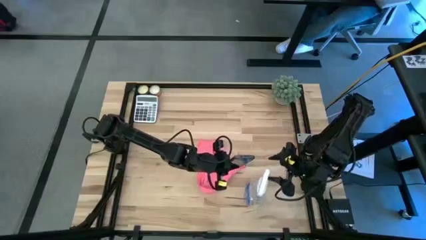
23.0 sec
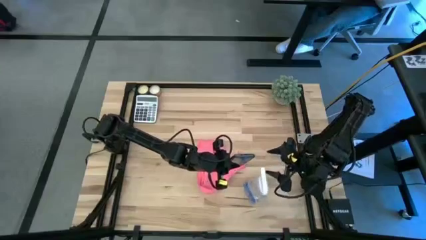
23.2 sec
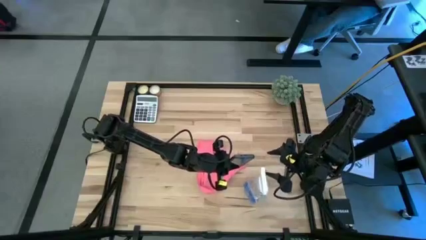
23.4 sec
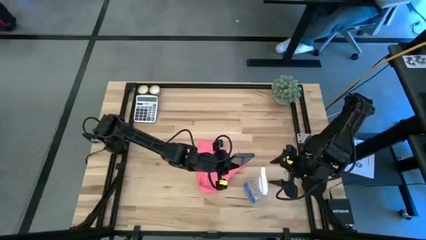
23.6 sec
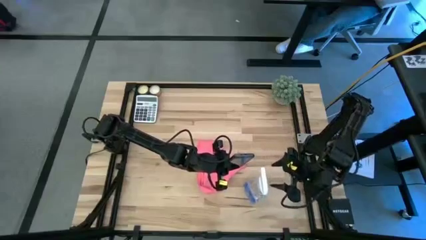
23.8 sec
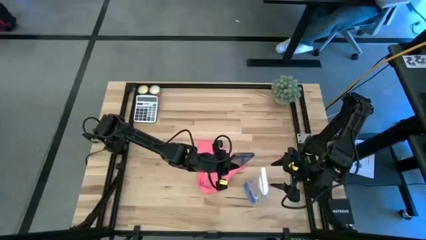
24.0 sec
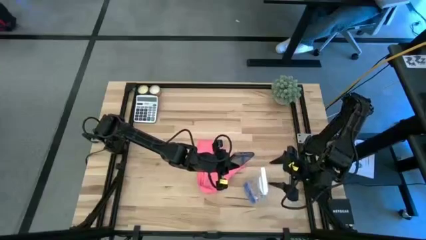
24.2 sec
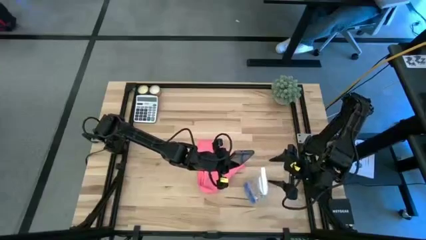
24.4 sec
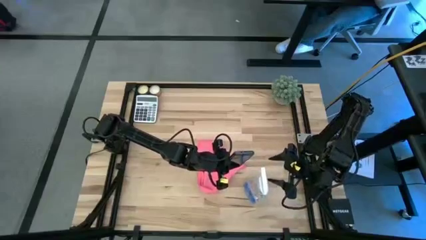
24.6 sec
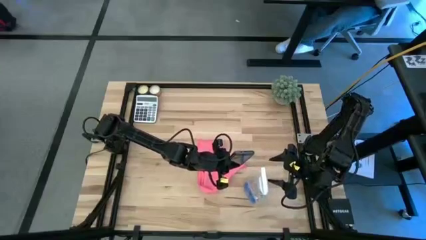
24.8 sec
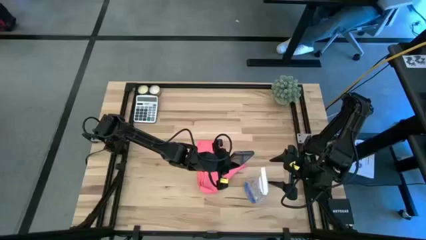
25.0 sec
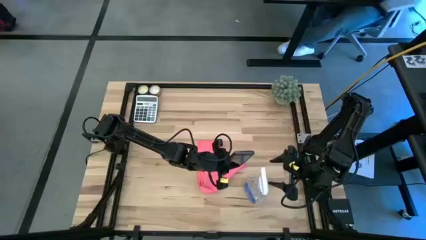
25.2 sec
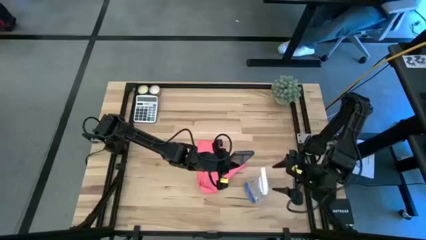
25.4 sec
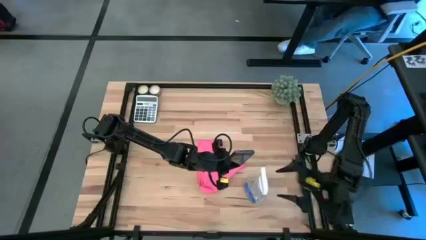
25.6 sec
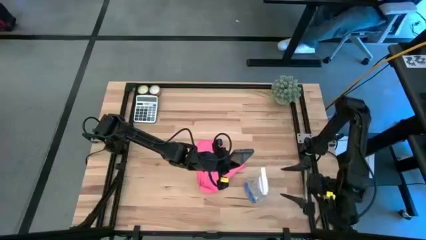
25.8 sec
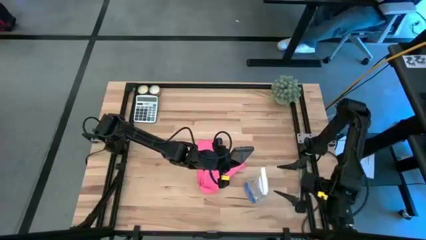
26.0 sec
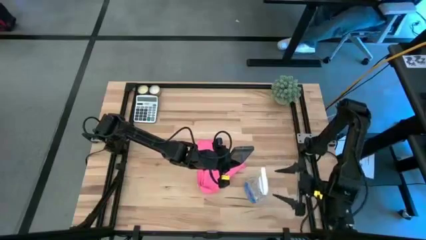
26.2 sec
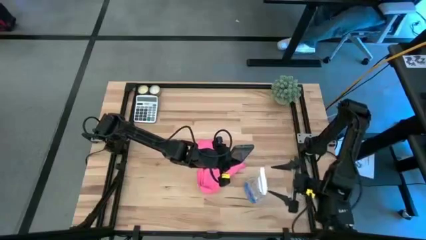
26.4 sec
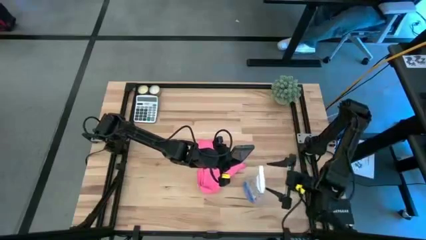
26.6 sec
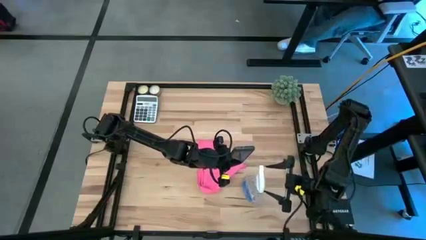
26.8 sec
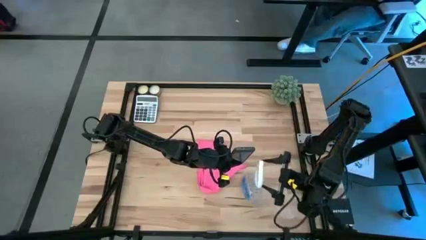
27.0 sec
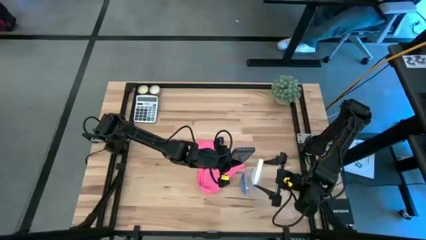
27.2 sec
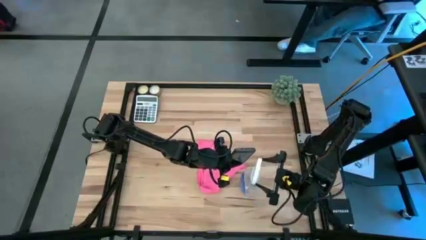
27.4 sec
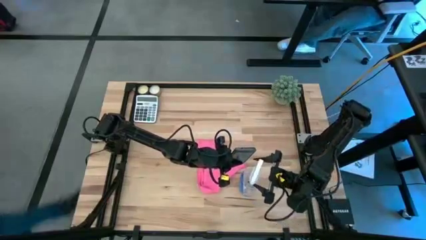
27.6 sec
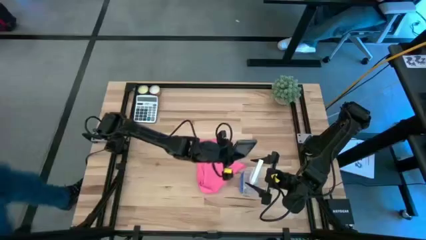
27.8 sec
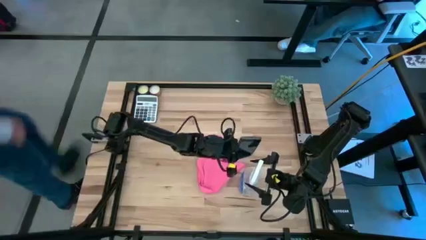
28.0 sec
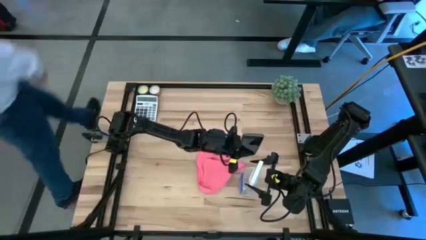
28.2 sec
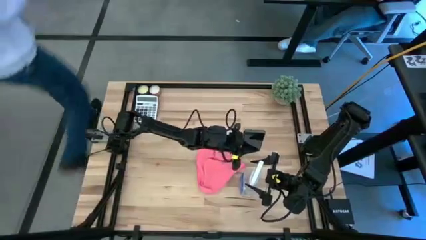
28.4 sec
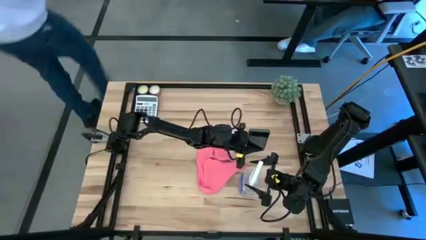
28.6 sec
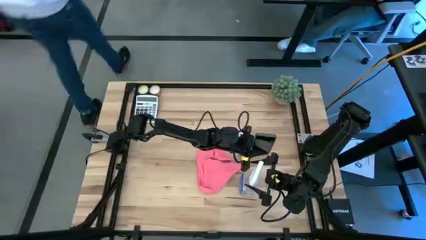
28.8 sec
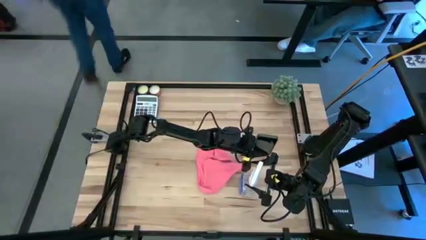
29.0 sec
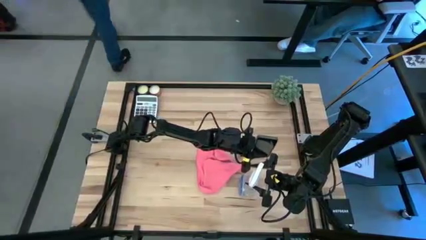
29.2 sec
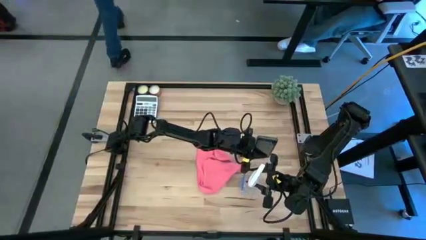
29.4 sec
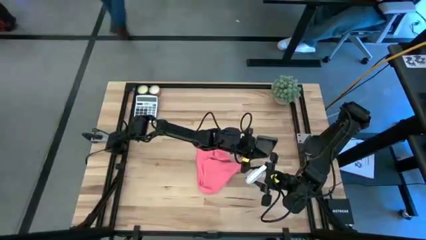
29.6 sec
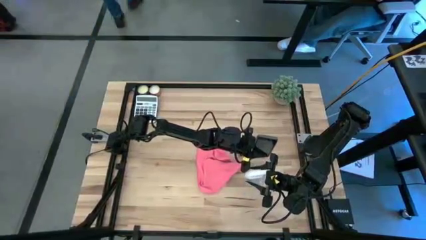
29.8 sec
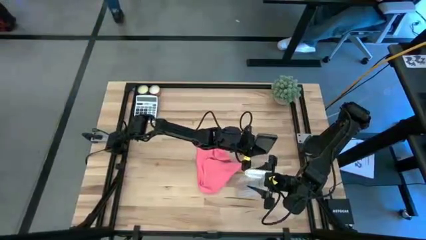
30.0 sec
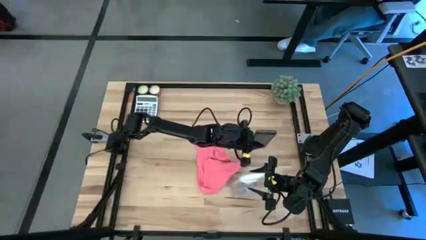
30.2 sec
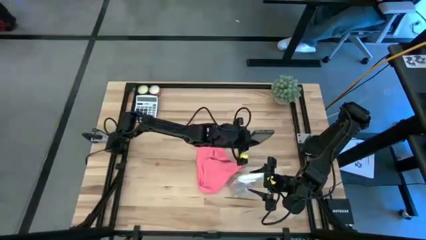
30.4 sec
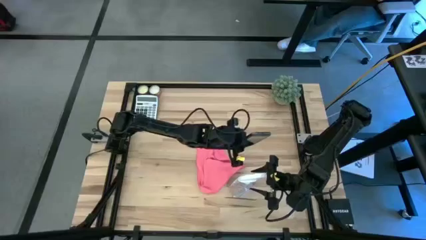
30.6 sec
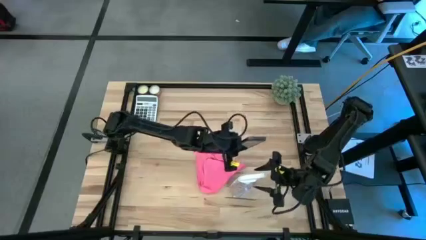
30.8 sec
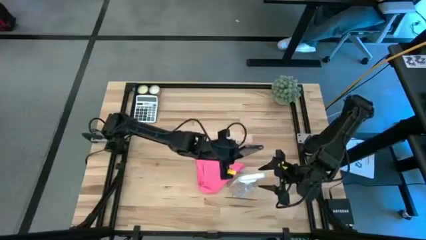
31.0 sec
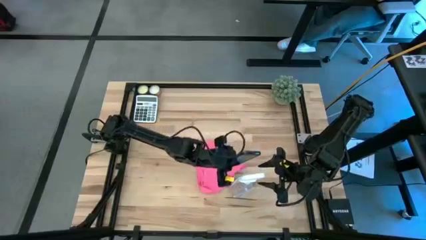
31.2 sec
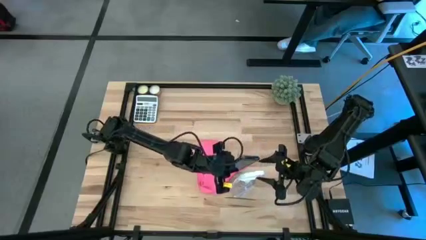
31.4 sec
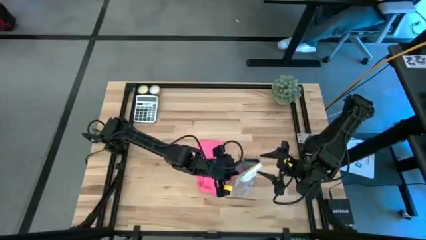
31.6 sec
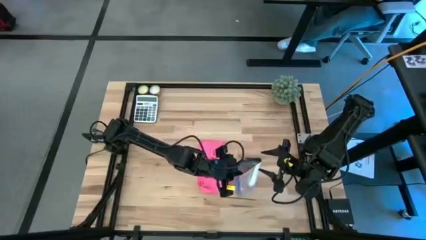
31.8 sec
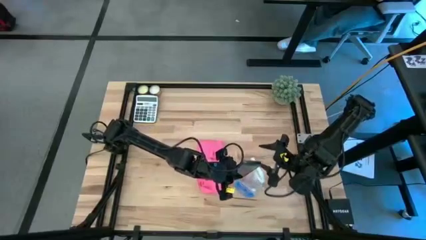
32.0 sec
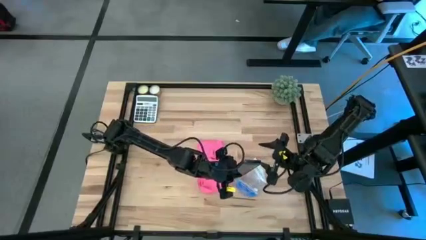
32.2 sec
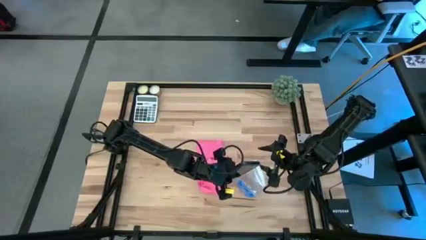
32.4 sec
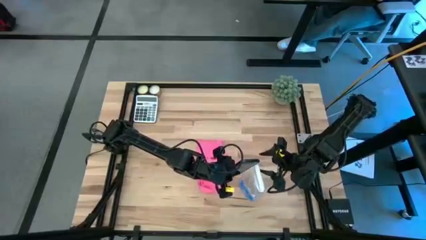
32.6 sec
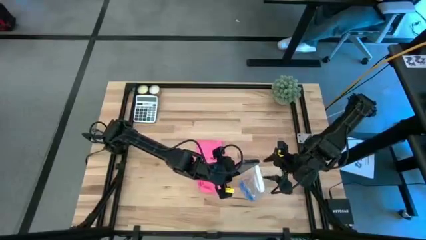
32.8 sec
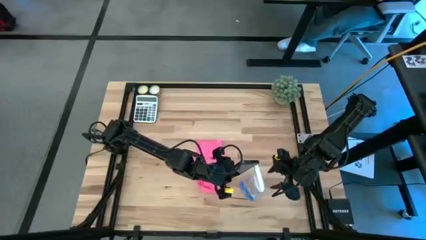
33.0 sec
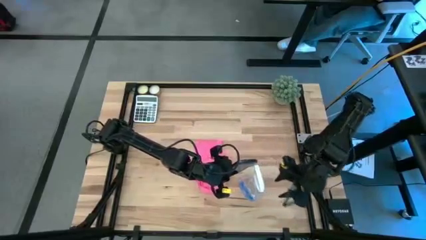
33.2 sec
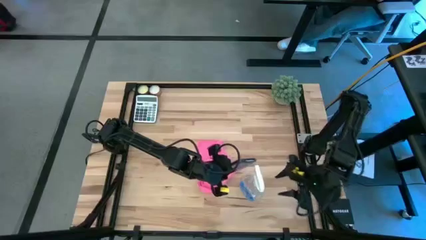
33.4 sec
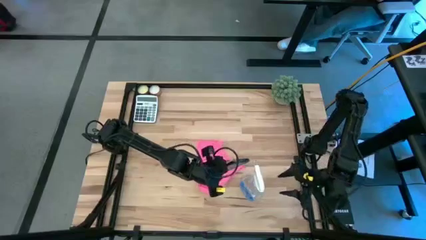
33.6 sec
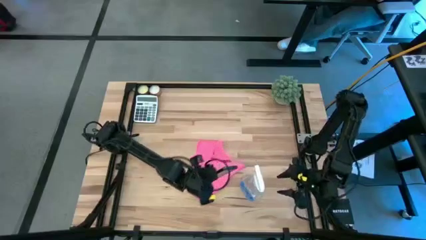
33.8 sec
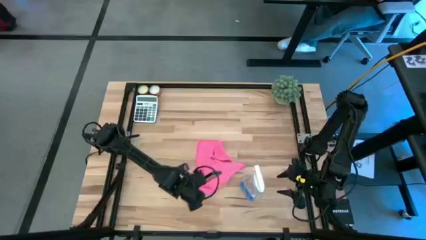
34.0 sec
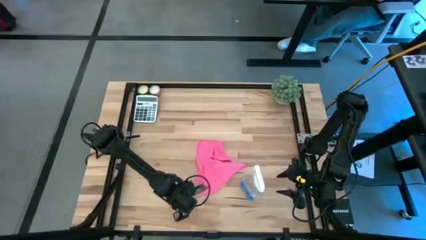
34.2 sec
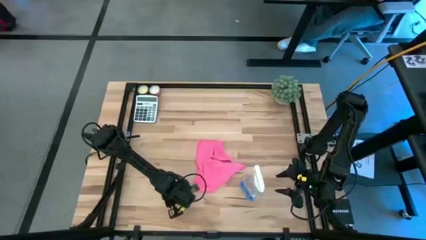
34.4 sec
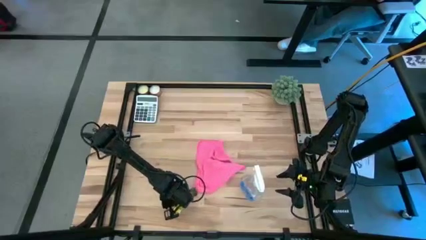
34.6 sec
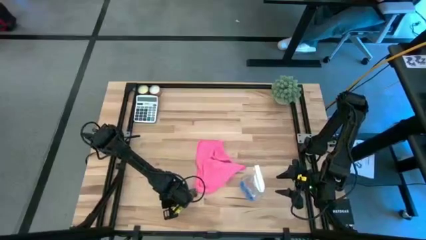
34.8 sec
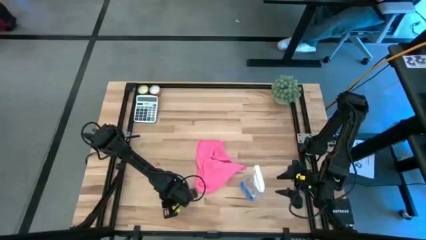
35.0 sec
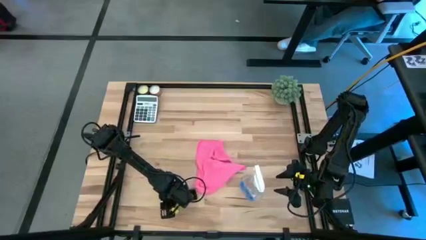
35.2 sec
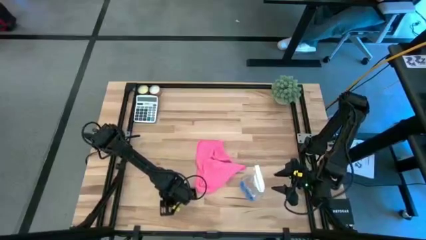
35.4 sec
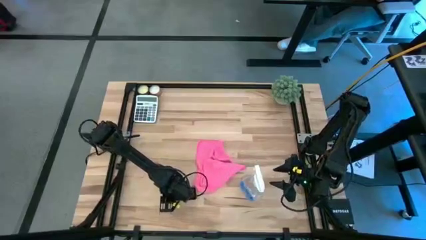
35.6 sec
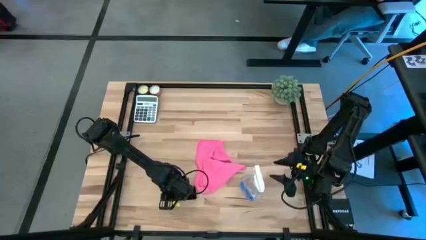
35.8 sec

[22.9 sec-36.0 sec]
Task: Apply microfiber cloth
Spray the black cellphone with the spray bottle
